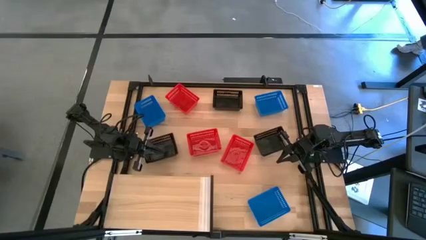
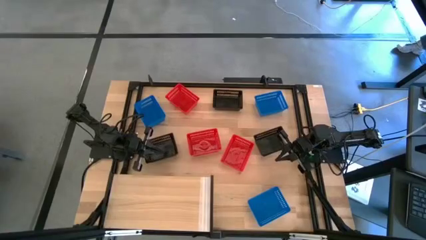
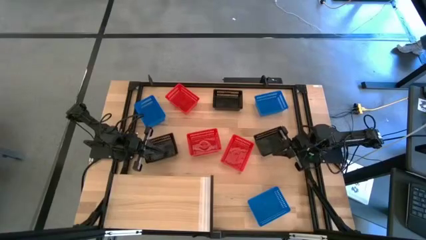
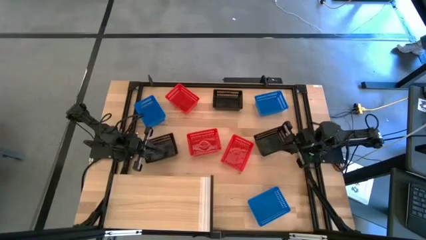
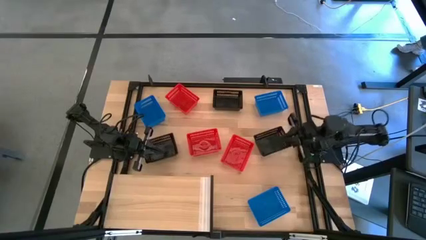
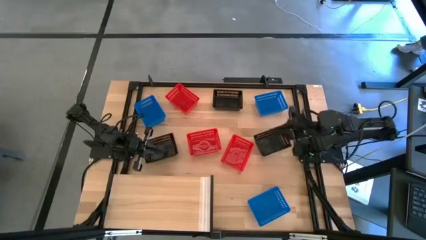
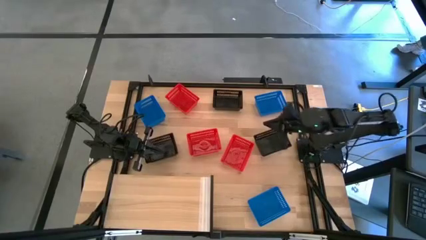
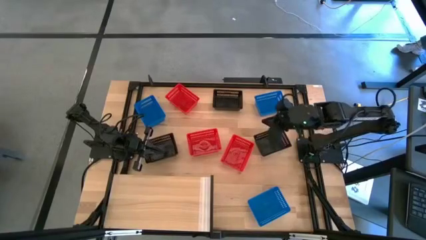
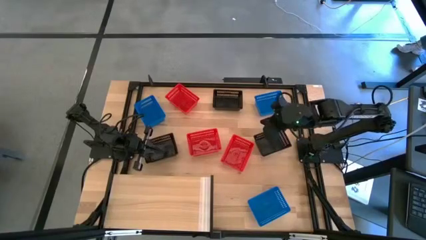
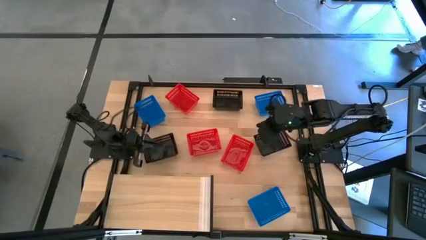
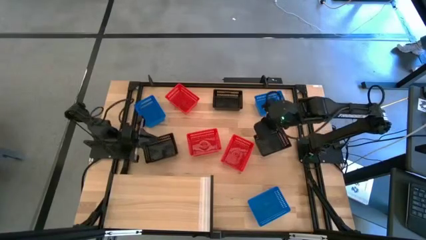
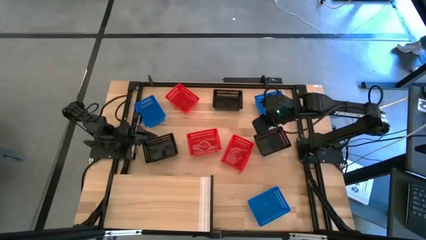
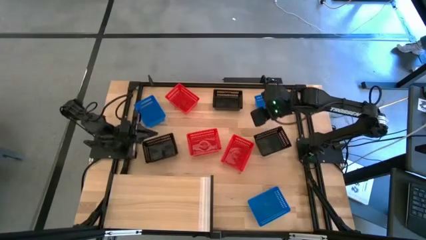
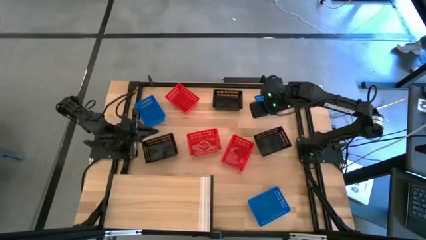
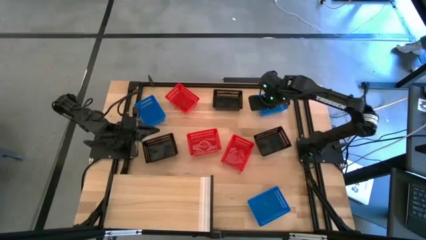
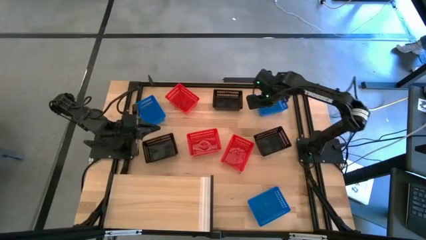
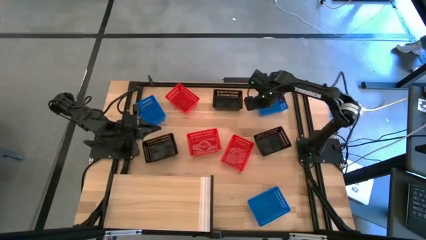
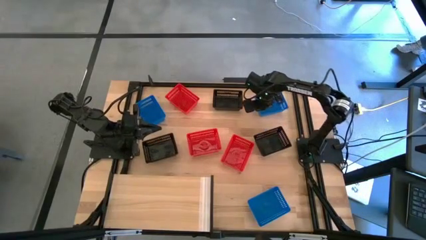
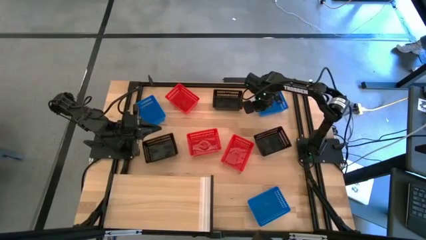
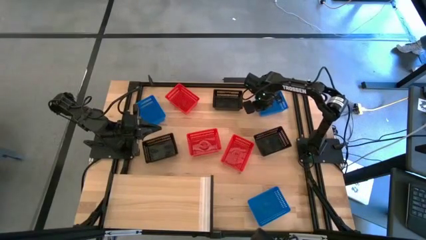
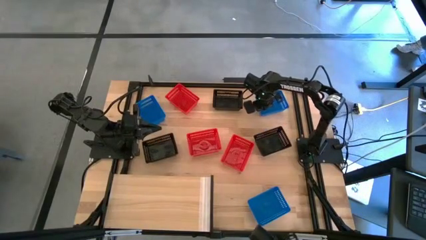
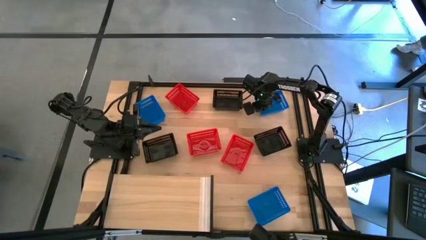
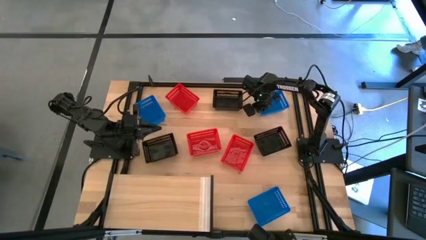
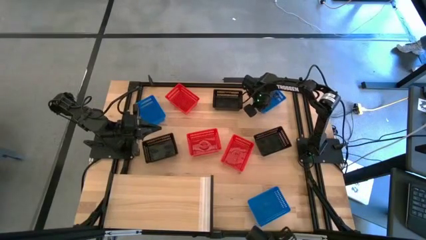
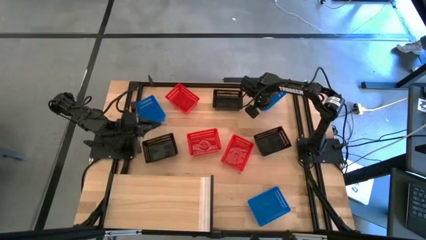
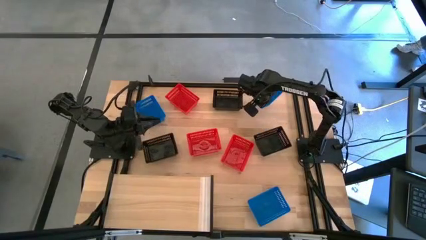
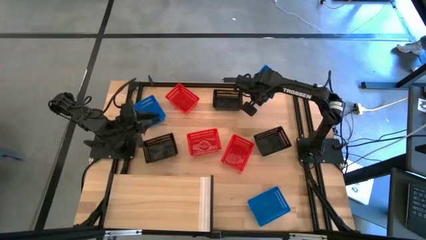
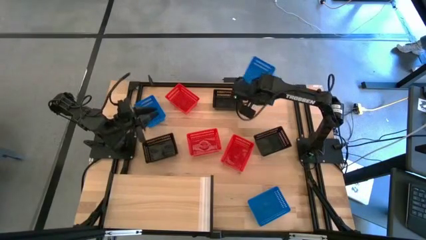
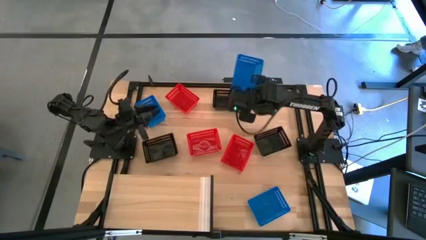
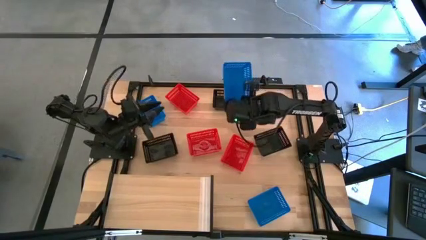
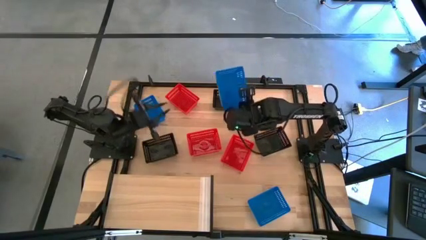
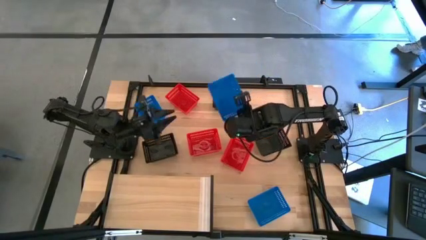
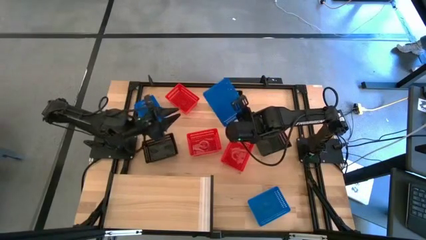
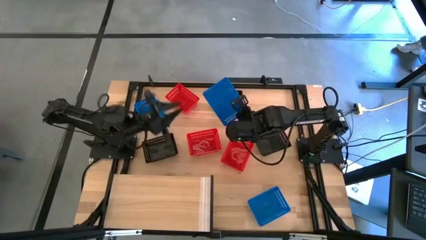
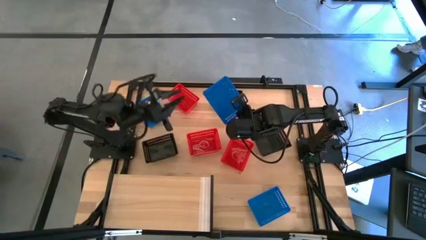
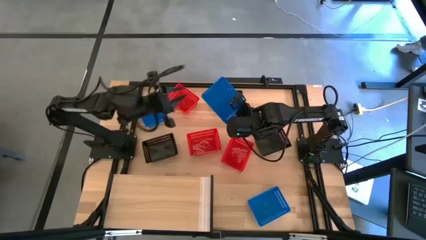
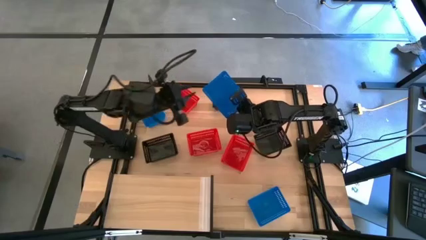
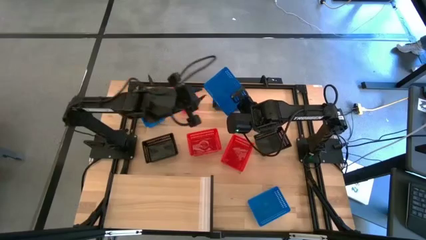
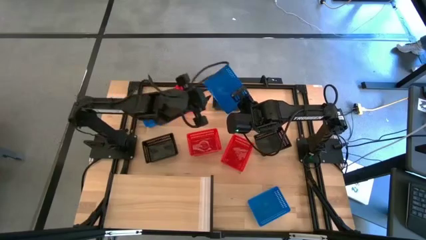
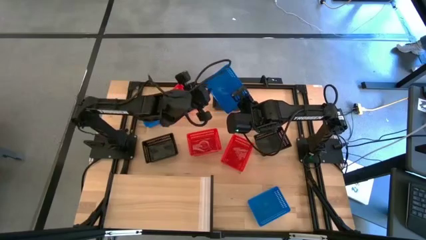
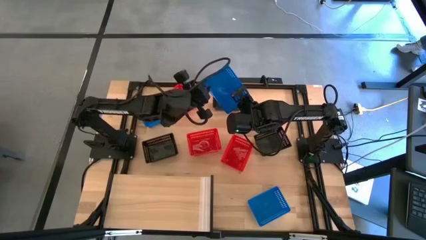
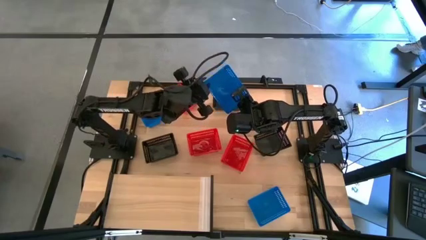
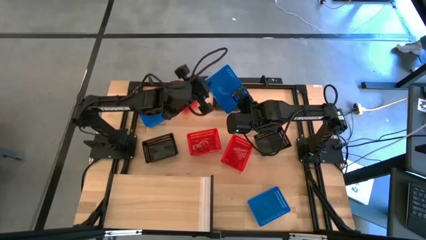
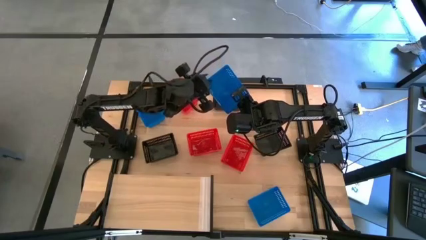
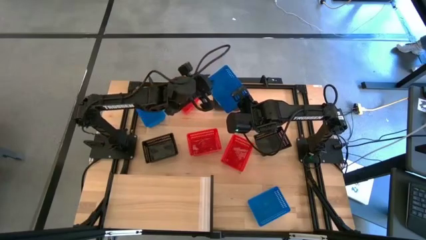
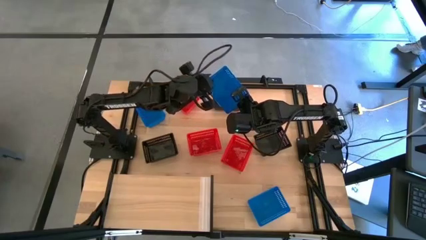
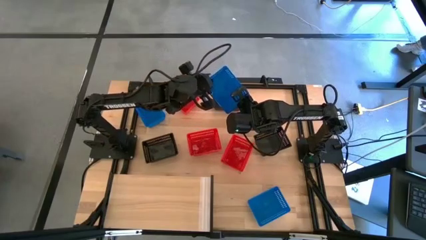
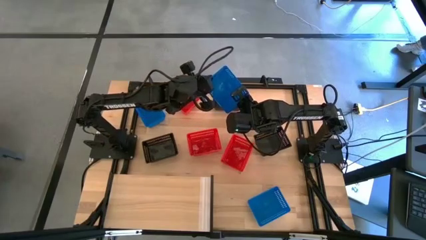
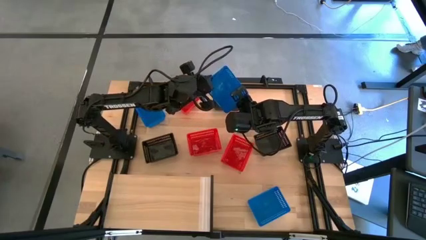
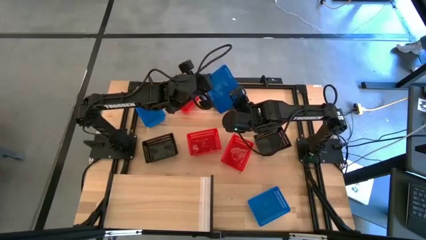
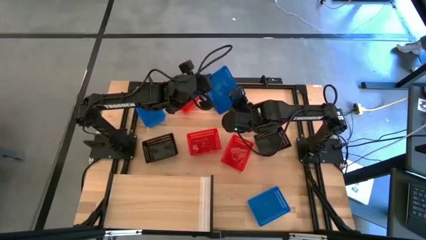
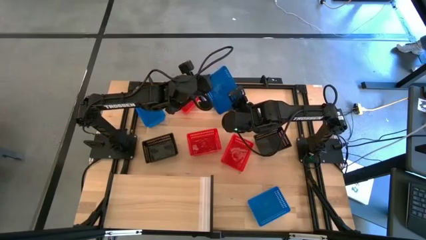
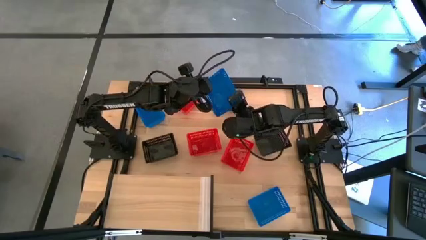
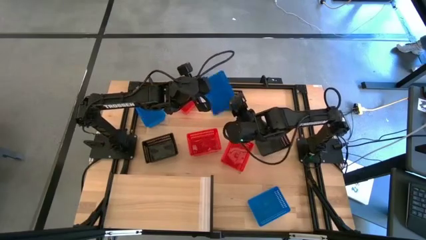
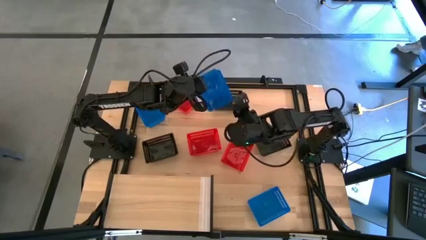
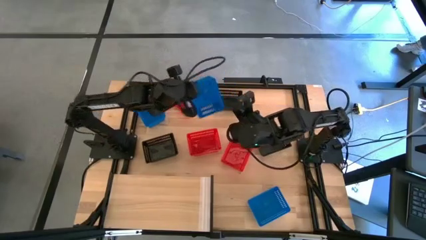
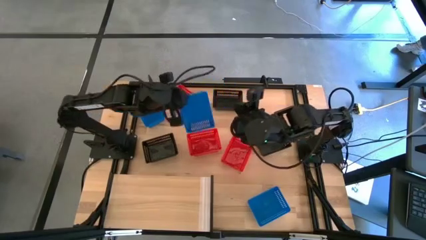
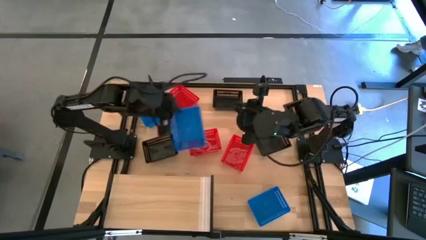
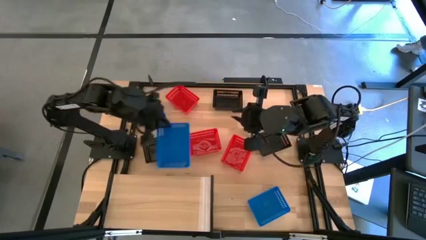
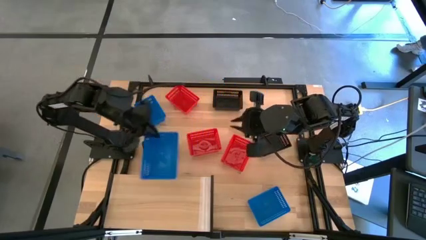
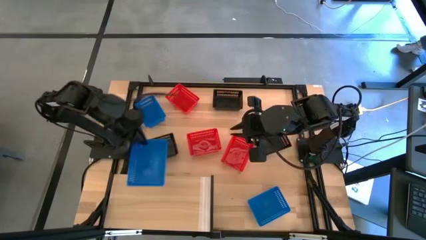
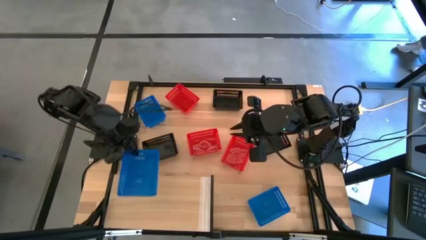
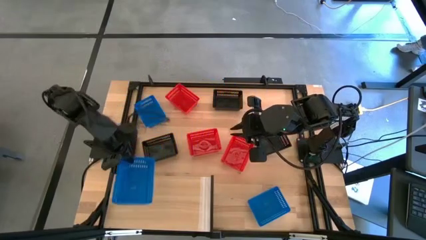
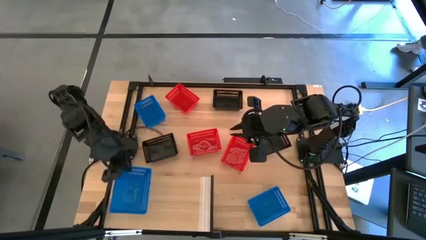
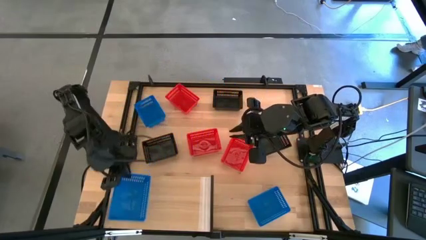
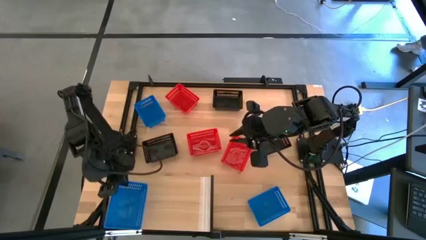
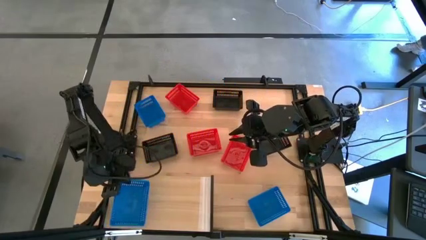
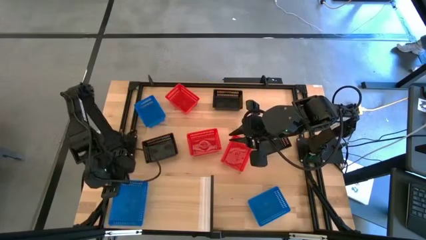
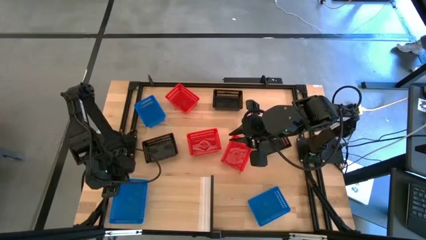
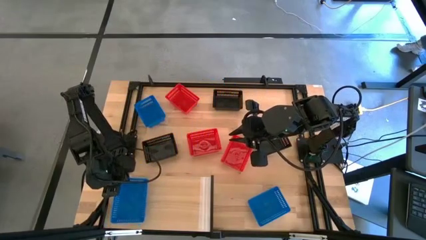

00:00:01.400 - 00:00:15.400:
Task: Stack baskets on shelf by color
Put the top right blue bin on the shelf
